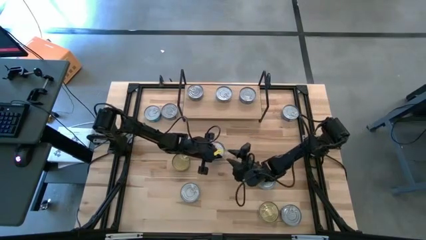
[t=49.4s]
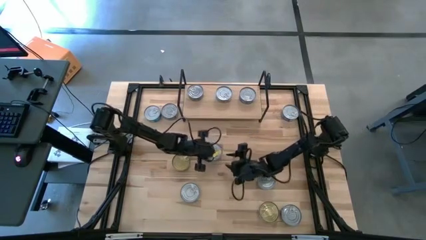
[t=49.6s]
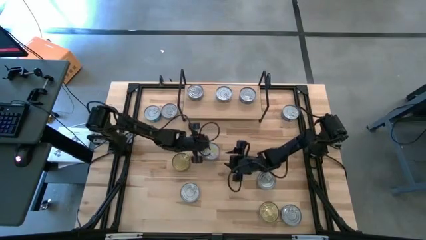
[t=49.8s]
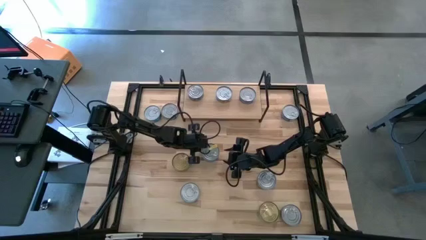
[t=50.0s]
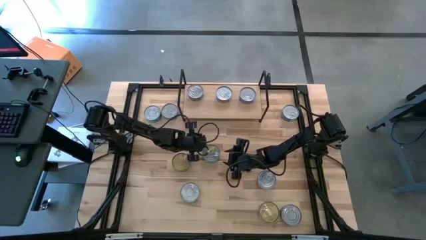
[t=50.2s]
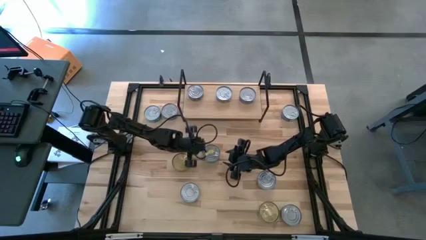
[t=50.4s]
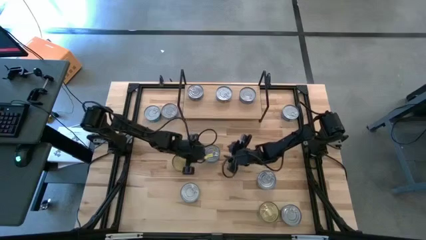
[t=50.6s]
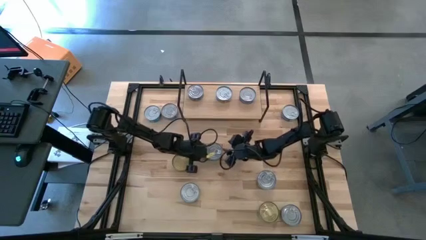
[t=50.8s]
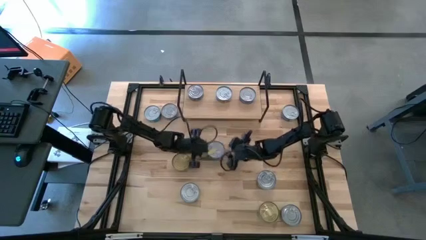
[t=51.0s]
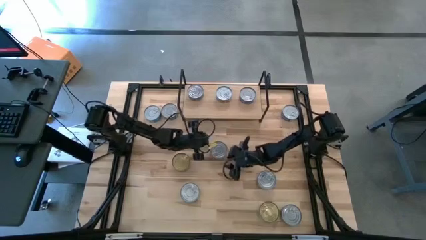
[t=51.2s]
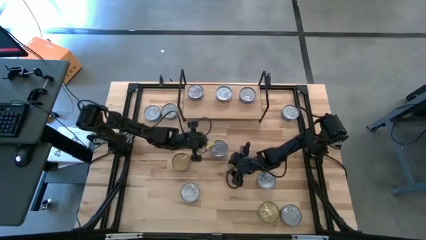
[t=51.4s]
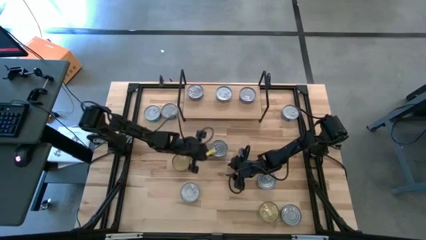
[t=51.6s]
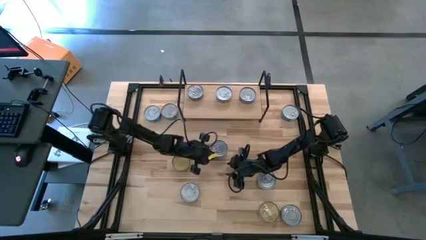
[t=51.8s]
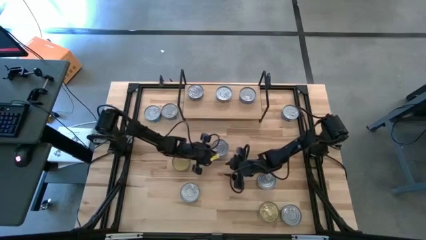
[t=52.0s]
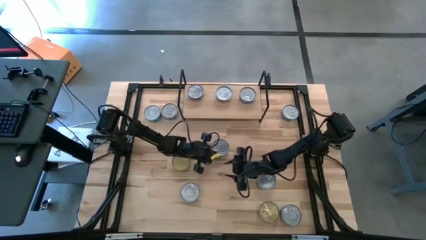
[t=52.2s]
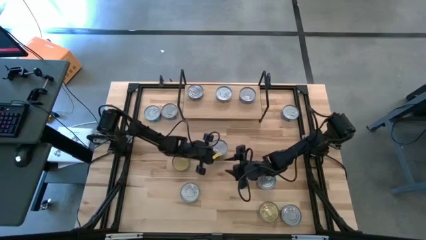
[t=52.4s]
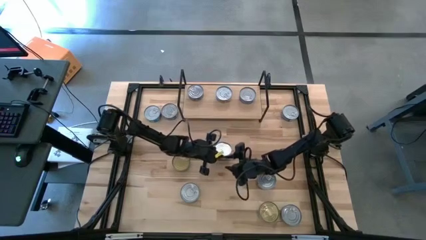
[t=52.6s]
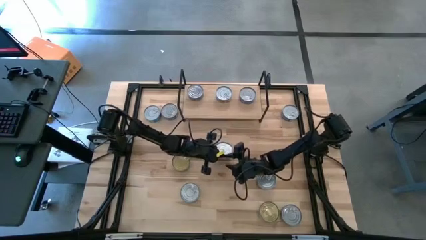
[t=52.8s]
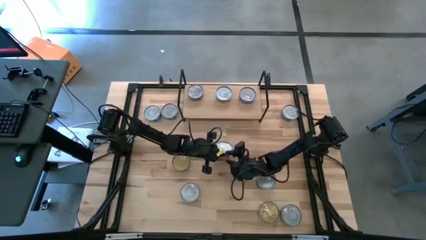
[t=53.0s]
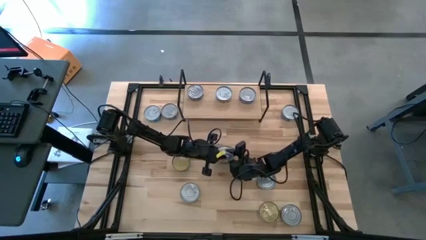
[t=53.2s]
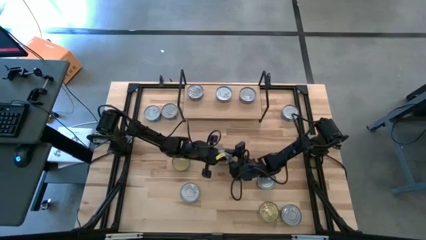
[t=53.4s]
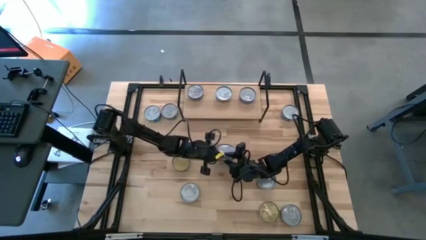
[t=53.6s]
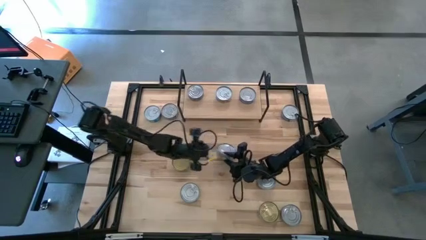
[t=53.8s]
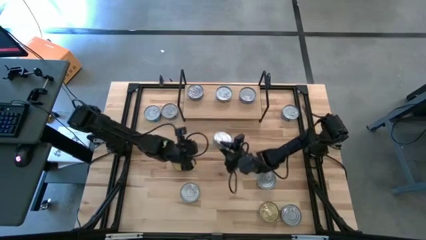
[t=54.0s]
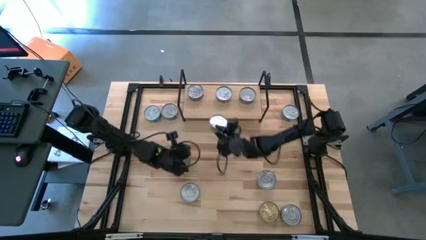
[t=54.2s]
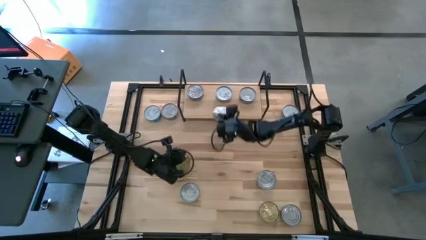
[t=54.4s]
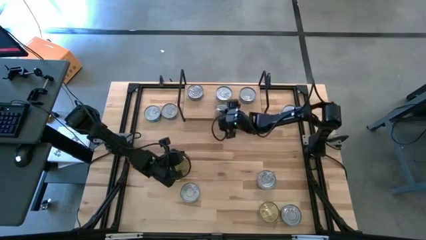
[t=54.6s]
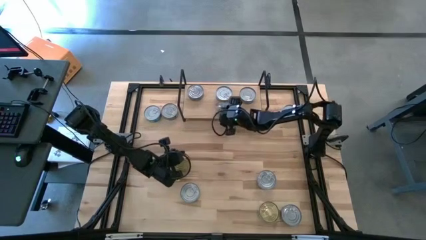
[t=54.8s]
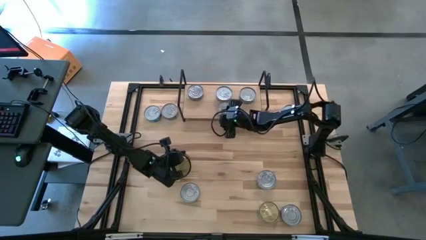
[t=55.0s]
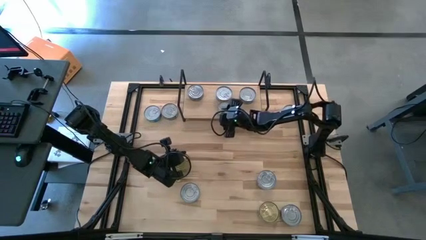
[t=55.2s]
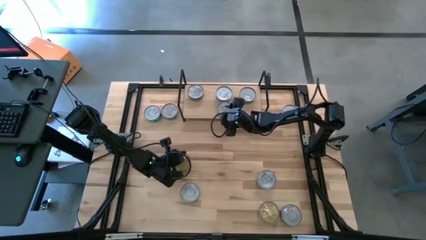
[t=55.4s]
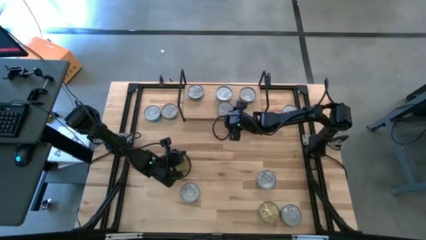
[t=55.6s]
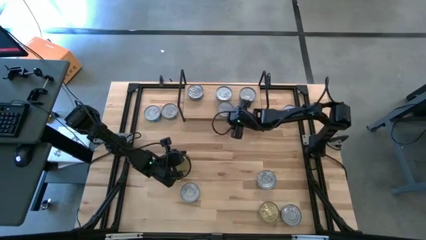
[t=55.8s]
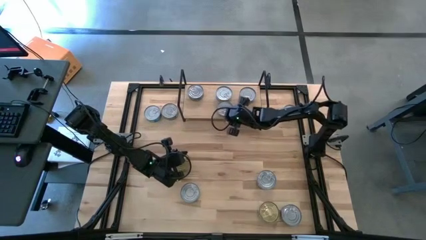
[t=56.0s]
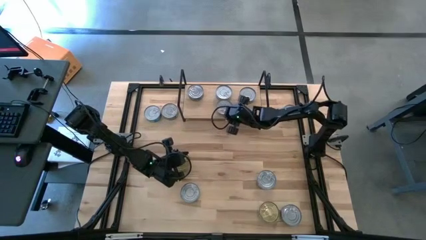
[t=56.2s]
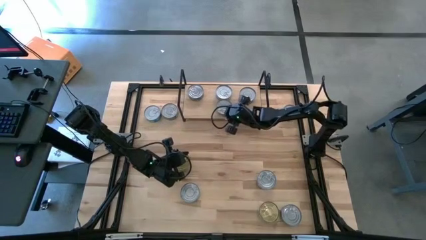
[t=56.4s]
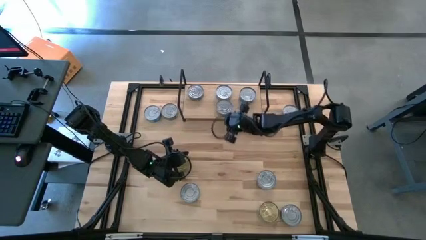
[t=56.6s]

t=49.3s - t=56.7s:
Task: Stack canned seafood by type on shelf
Put the yellow and blue tuna can on the shelf

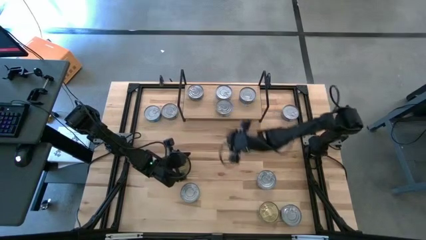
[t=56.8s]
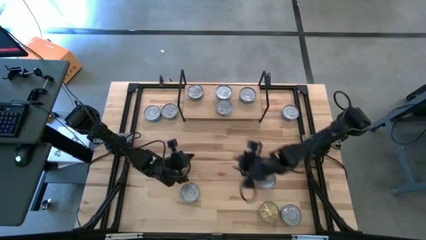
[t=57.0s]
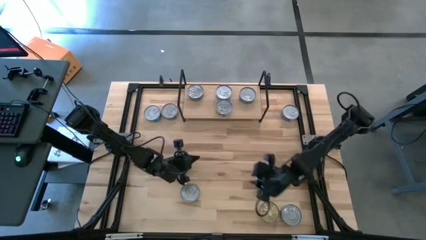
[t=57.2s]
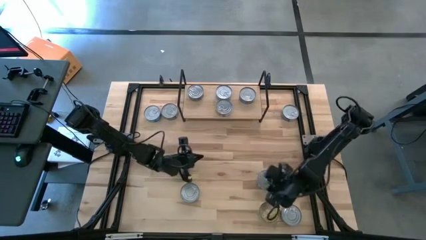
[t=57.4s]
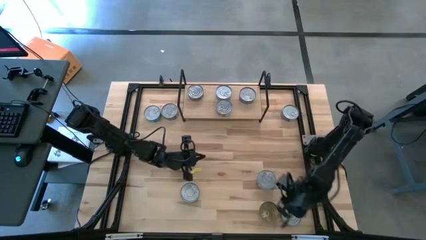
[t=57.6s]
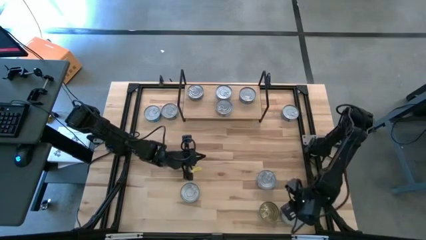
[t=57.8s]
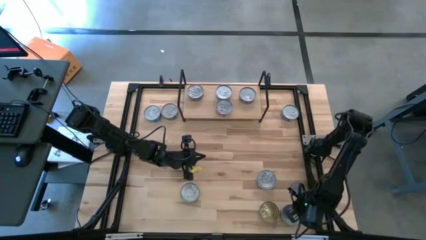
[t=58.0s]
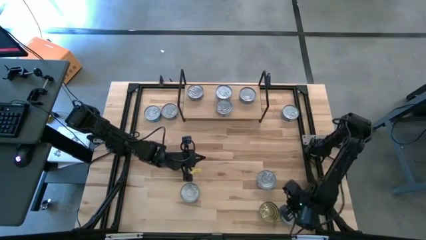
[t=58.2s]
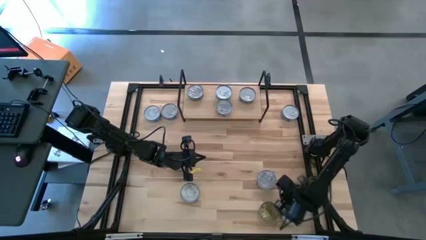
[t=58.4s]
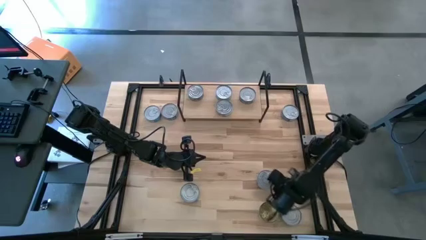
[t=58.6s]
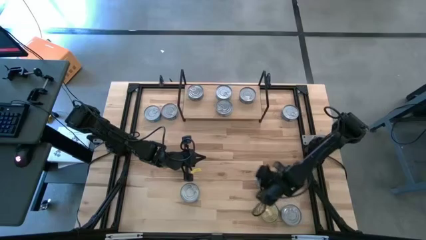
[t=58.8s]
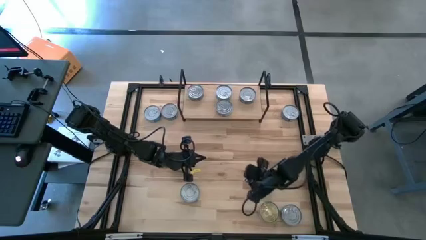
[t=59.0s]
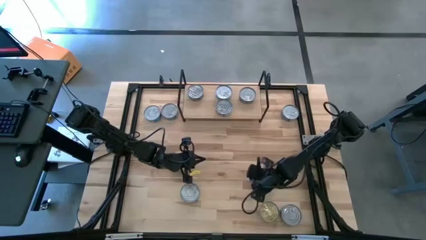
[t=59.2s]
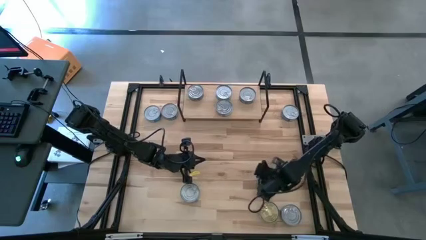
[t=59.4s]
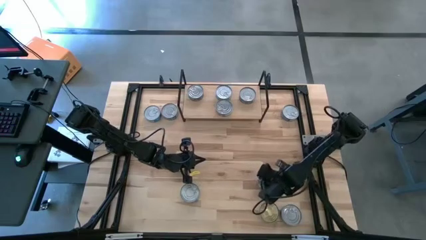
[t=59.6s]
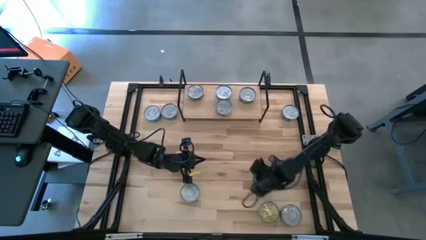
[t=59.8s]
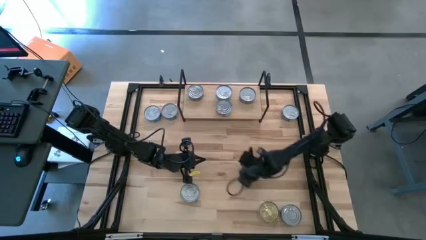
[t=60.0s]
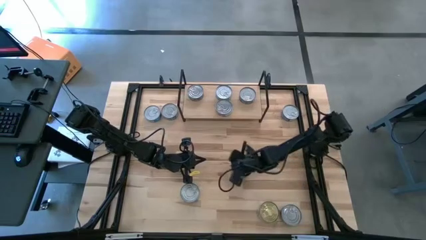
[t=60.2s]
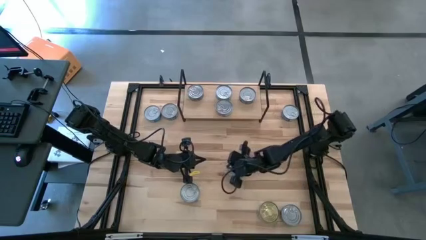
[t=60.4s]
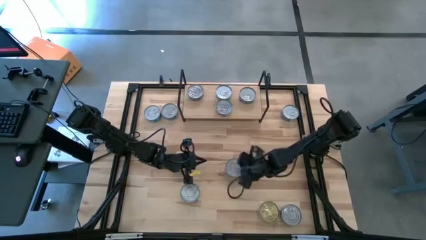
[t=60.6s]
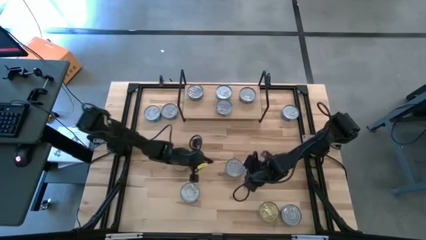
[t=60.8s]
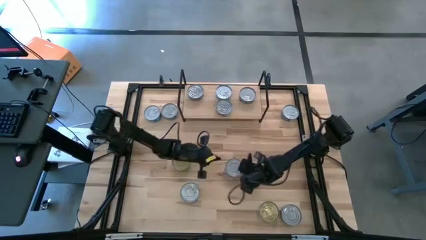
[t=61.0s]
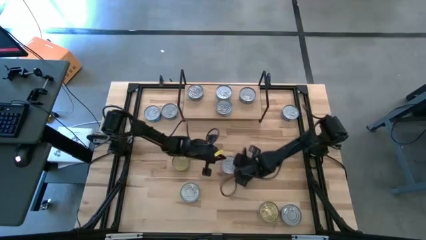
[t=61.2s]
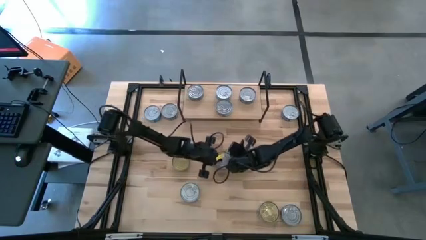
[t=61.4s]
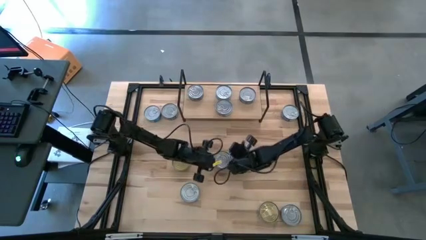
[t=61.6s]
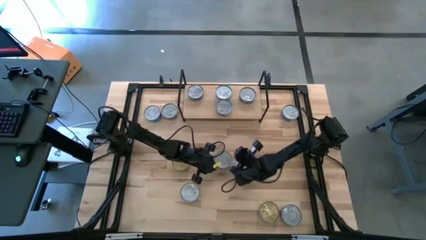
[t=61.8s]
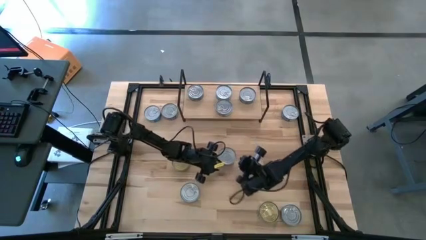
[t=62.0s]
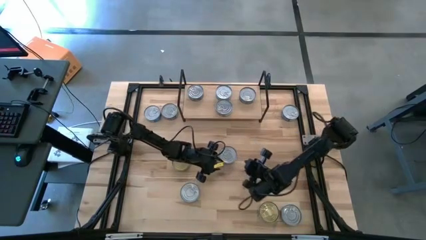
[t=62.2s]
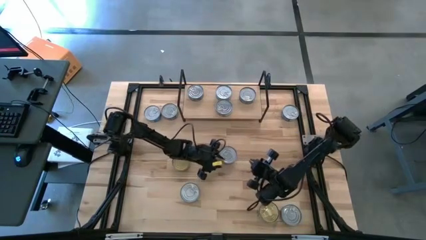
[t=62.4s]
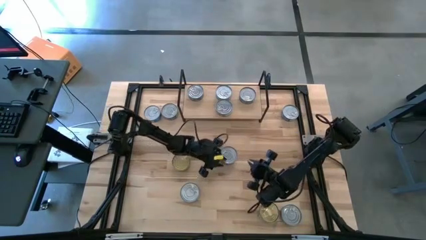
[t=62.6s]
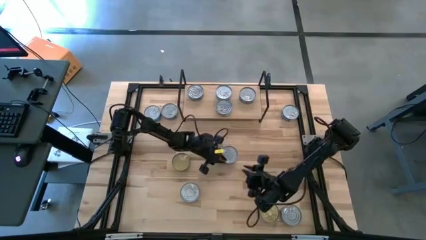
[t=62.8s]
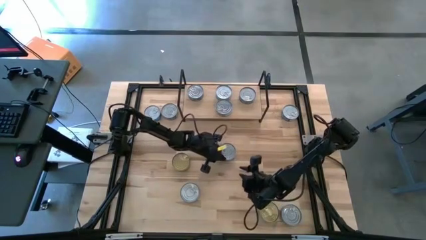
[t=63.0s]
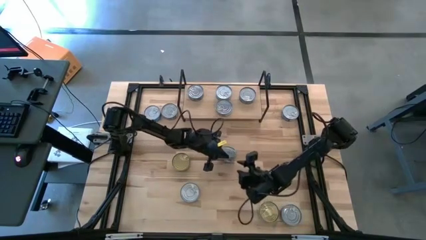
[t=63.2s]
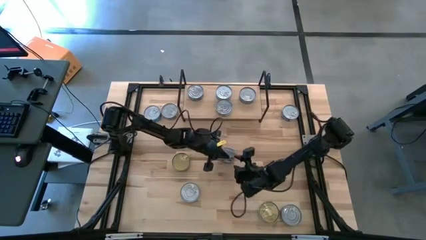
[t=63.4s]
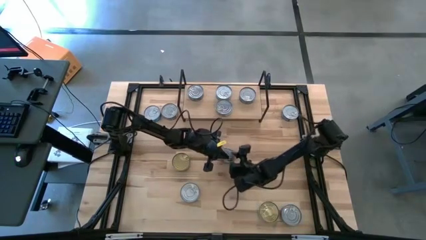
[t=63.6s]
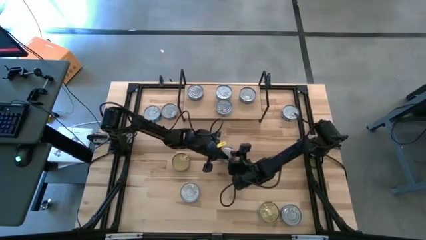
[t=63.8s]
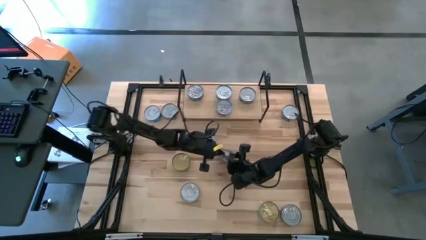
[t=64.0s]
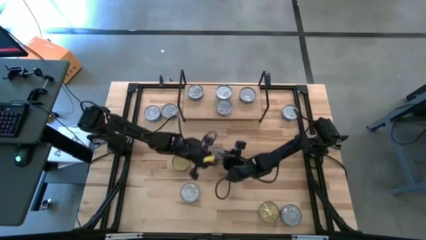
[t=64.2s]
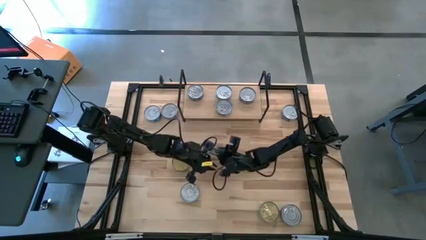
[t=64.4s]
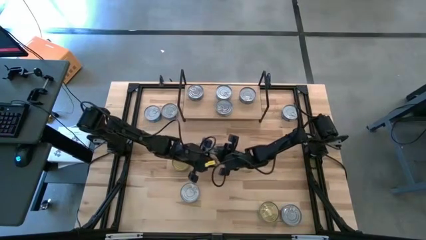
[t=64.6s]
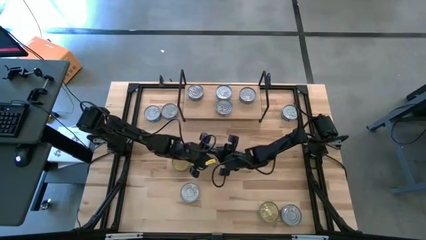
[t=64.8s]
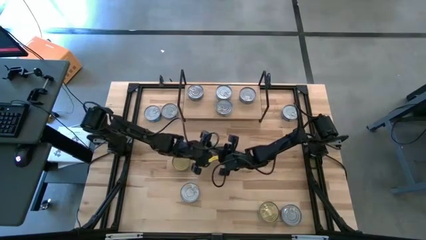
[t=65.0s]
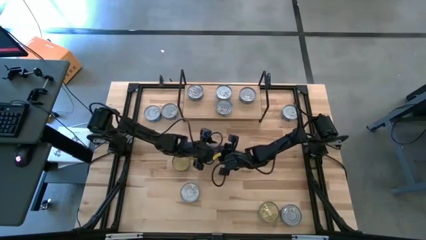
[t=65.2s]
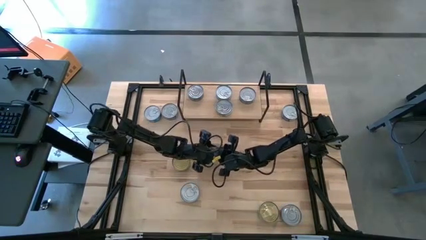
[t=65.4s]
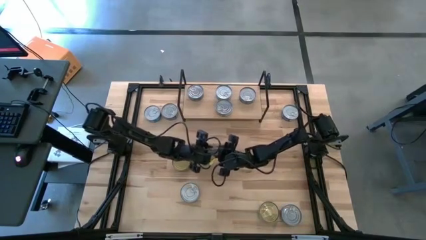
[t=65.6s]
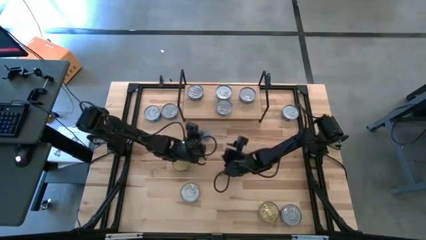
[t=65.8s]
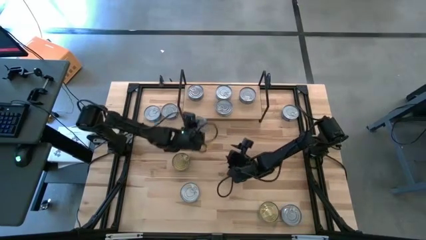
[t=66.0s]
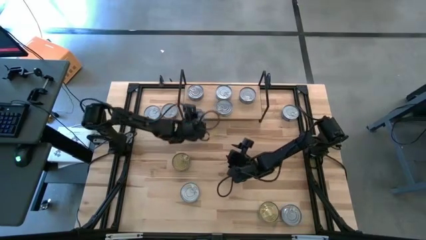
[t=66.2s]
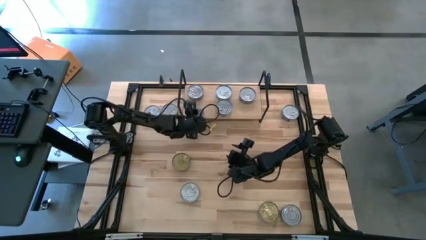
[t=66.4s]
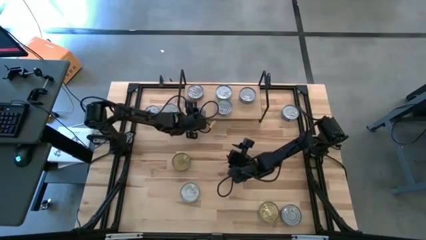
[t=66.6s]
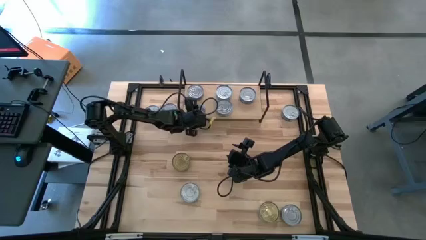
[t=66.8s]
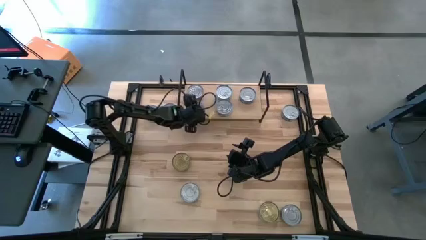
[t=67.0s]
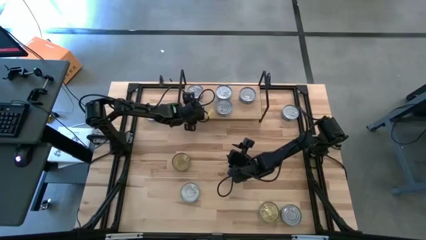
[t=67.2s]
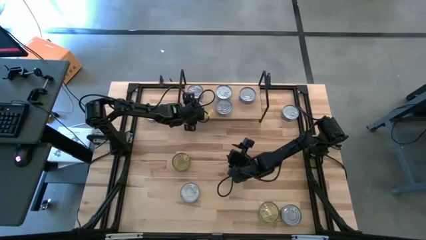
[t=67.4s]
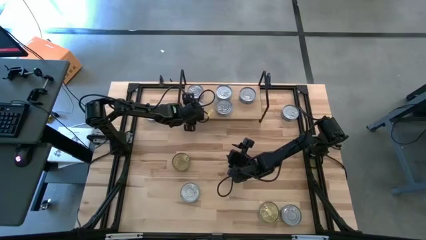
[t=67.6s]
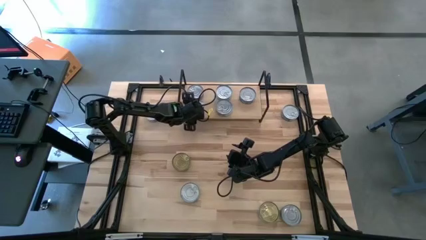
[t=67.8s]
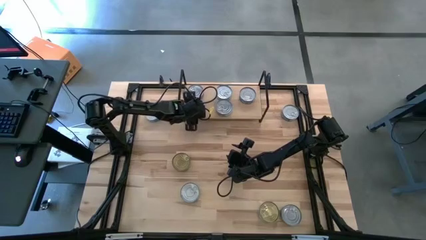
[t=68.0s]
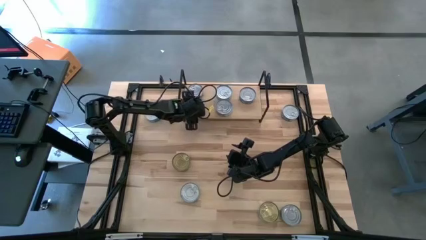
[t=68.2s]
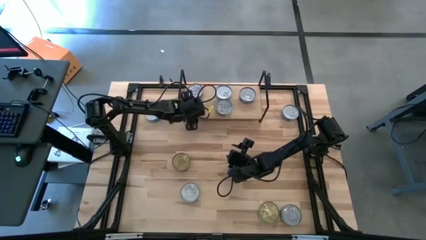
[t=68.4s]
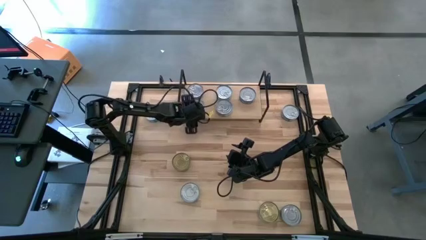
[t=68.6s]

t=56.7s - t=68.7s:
Put the green tuna can on the shelf
